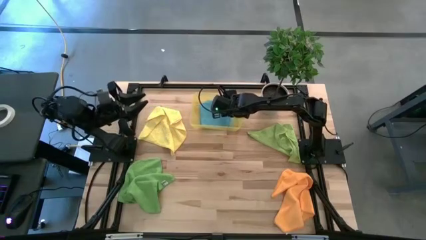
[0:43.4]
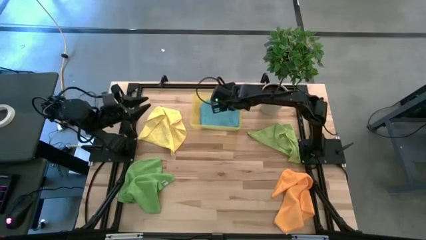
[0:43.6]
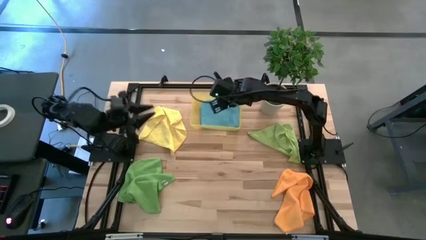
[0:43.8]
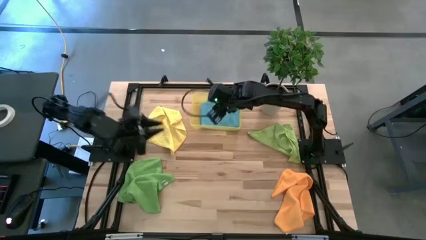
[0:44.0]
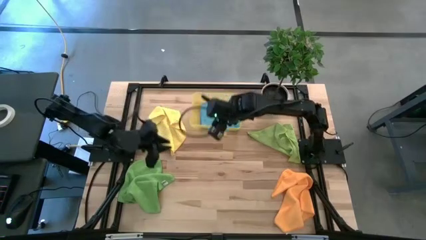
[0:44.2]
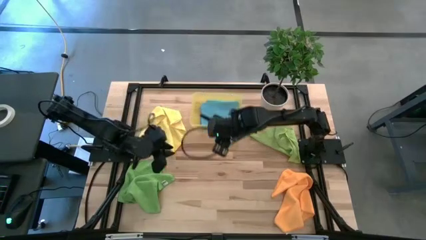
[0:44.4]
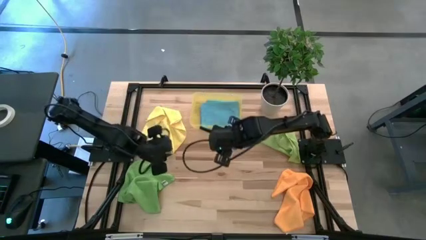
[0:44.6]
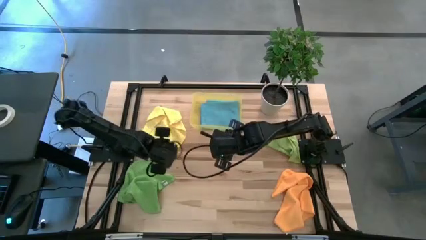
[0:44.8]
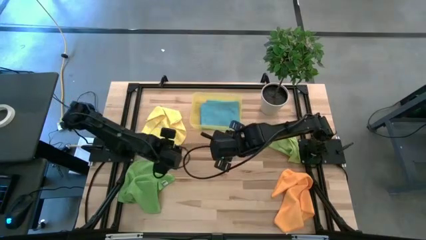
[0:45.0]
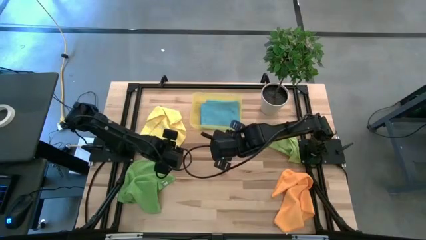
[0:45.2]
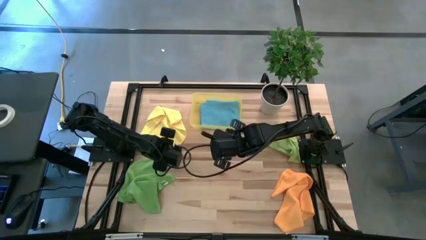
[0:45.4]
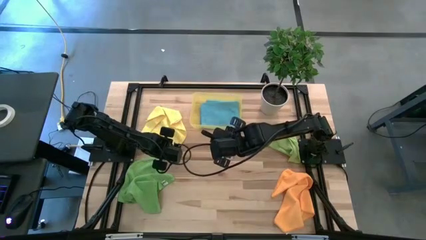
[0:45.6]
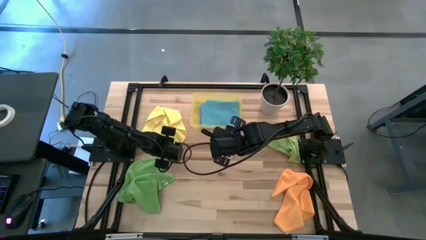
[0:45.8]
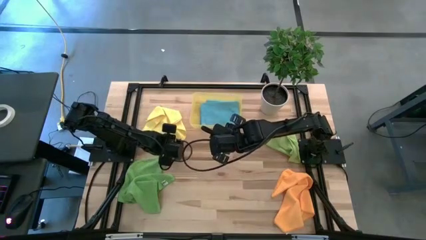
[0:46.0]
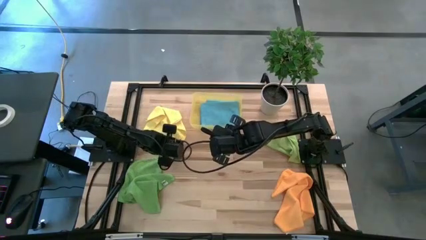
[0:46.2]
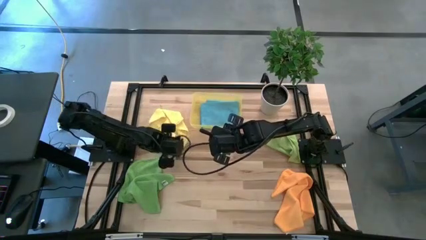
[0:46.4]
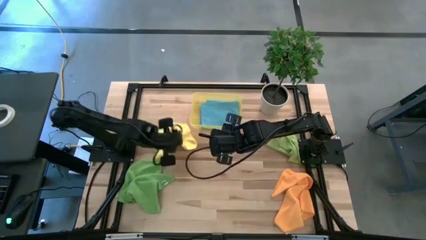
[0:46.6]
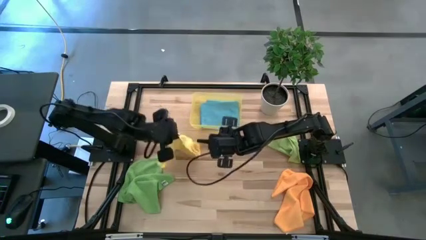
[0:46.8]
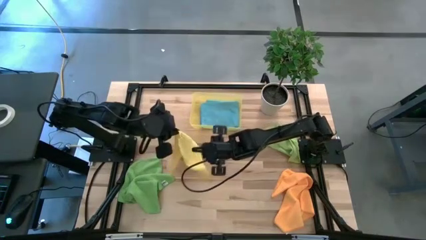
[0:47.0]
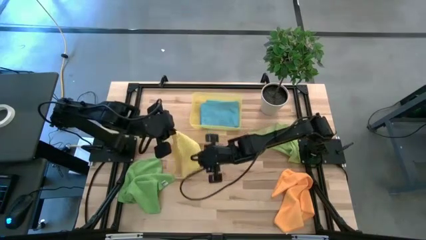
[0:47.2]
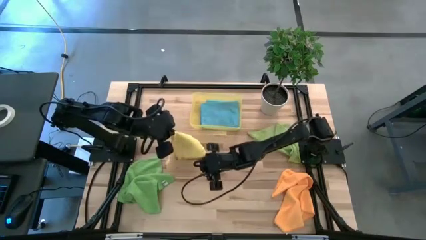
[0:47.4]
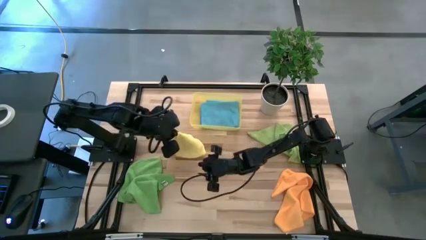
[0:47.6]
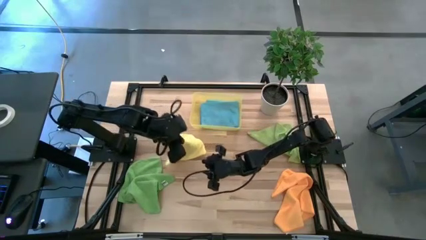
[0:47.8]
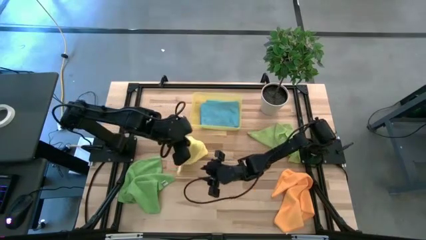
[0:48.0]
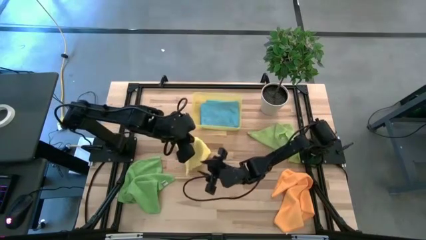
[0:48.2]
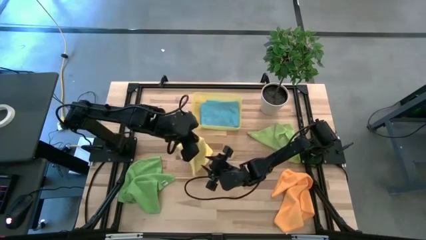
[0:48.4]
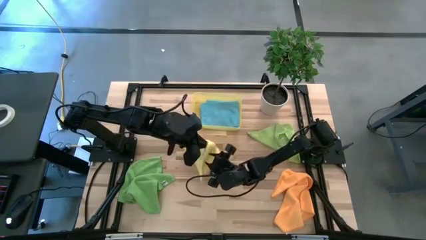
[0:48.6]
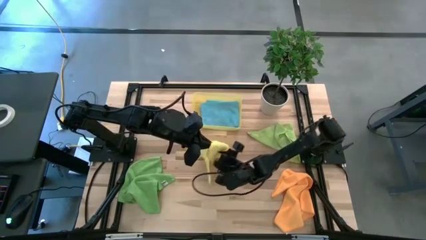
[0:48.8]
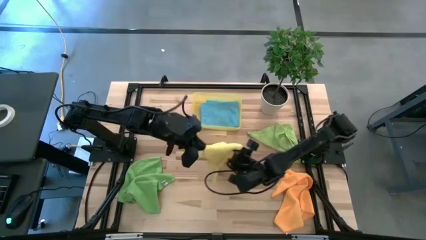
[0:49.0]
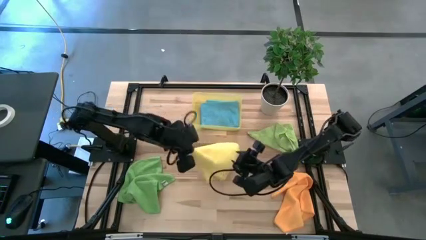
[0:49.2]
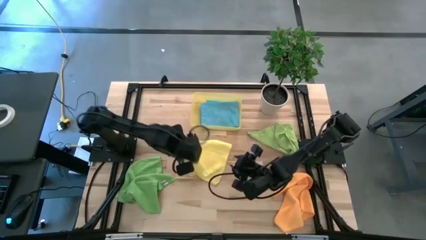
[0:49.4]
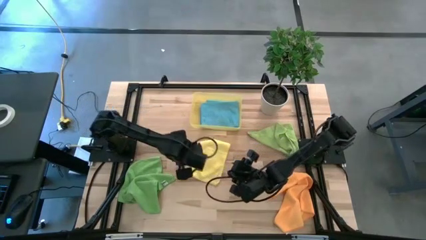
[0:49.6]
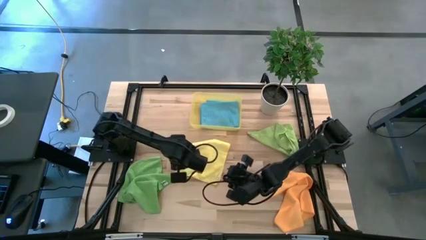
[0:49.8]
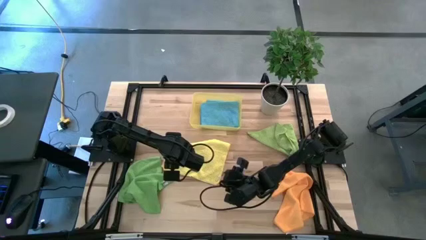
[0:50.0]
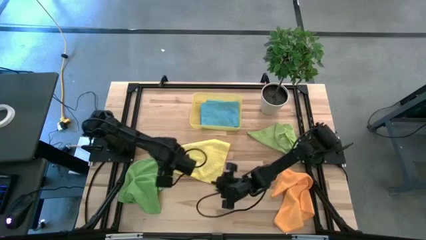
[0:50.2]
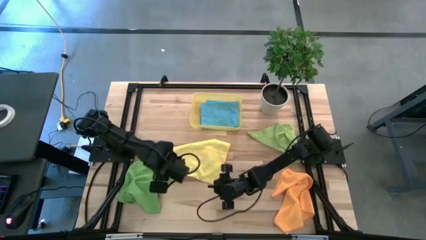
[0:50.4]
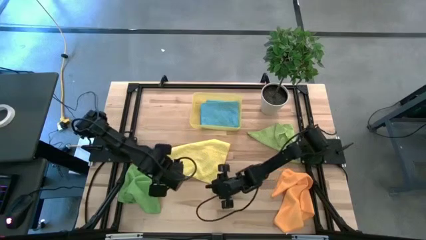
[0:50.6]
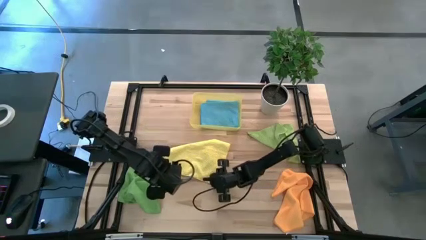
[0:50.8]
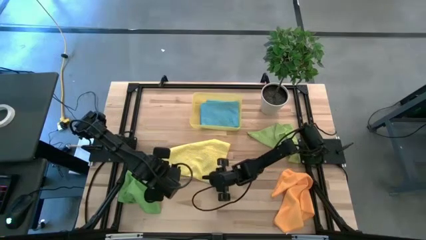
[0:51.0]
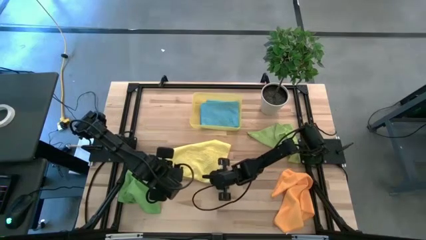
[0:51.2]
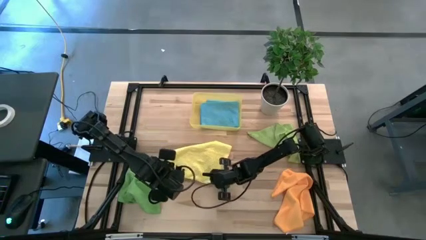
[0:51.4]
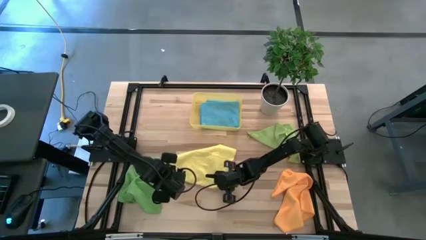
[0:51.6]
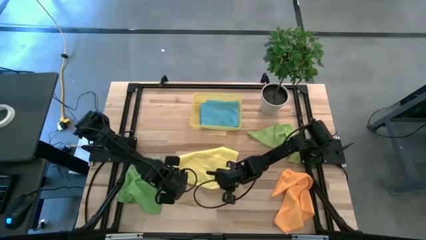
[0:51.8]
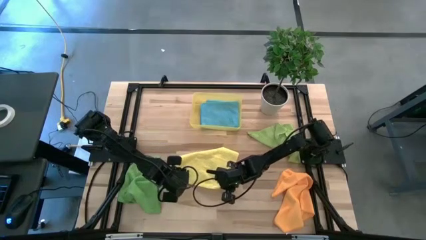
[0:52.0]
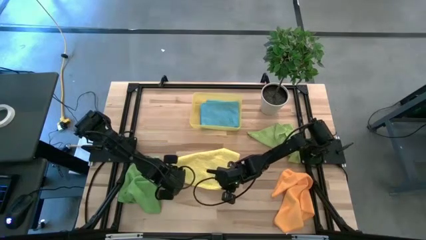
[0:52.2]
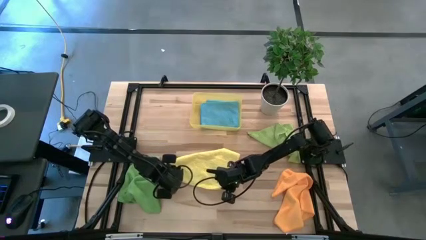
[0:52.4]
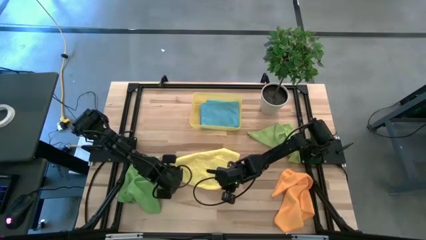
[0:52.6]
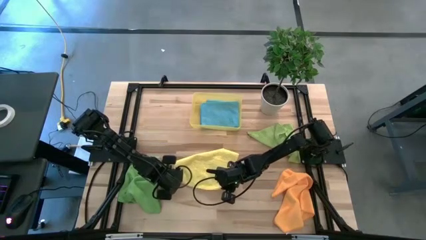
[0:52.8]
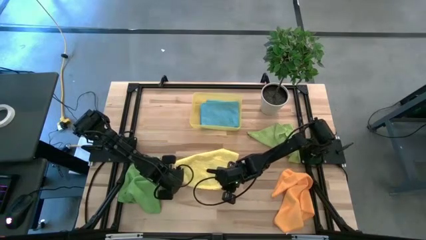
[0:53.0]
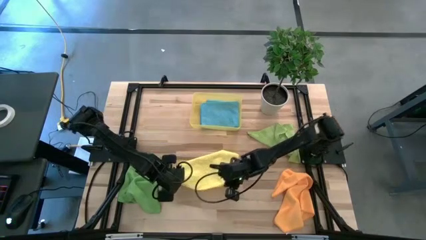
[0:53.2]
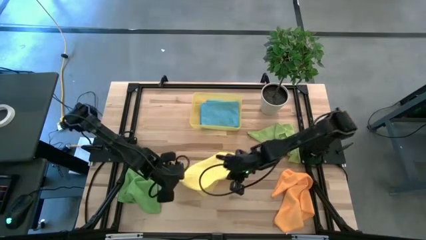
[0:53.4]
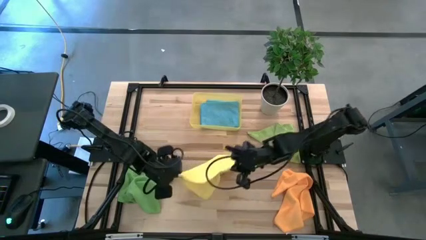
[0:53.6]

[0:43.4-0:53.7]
Task: Fold microfiber towels
Fold the yellow microfiber cloth

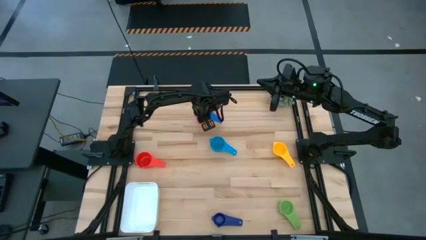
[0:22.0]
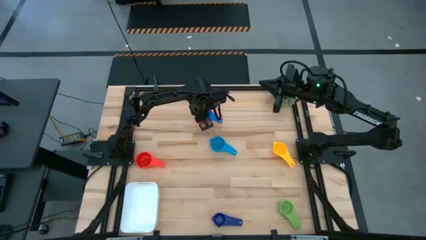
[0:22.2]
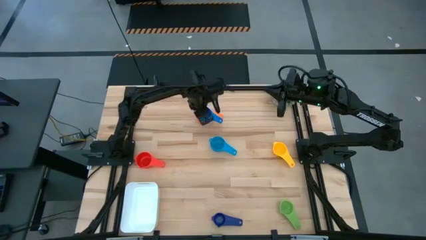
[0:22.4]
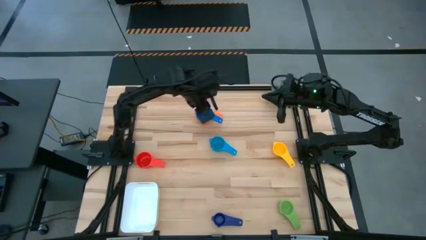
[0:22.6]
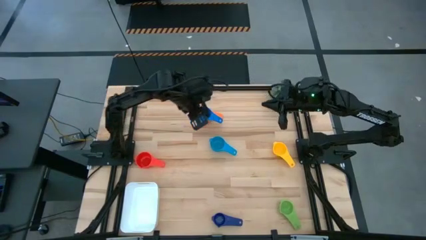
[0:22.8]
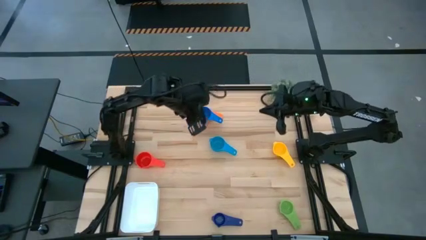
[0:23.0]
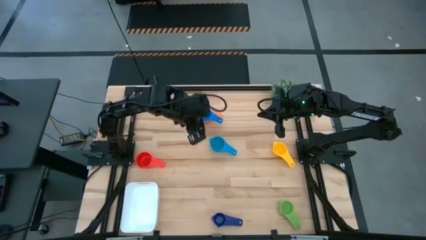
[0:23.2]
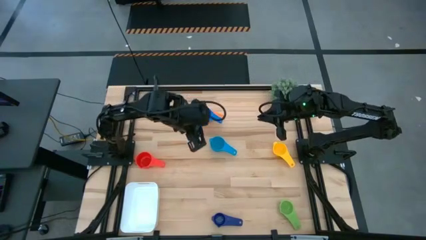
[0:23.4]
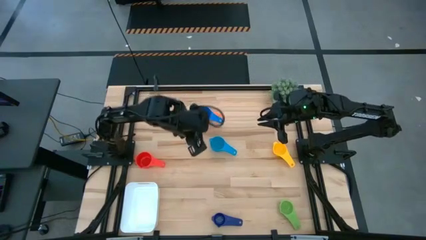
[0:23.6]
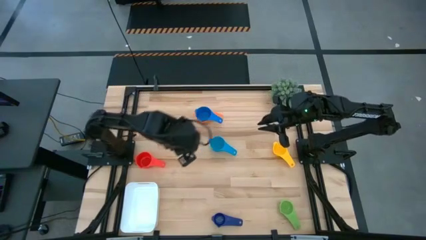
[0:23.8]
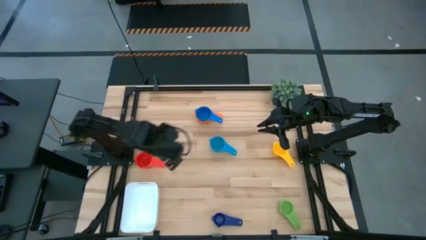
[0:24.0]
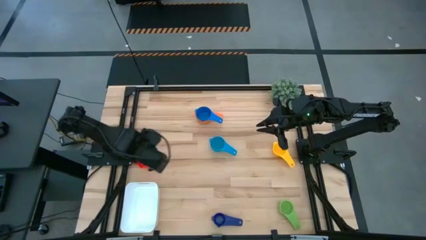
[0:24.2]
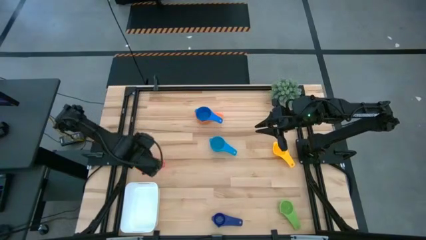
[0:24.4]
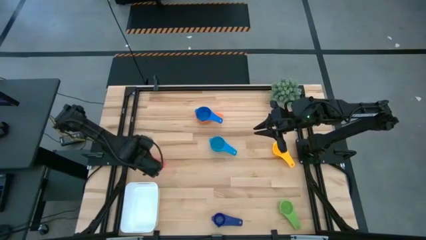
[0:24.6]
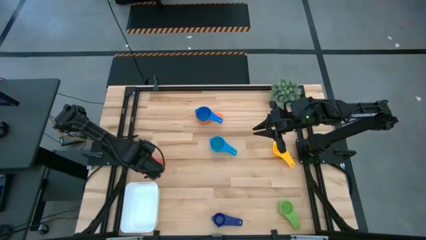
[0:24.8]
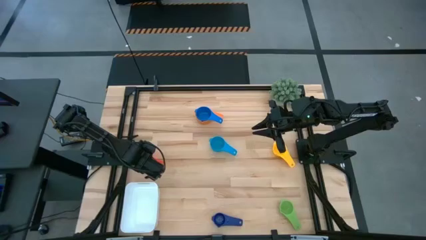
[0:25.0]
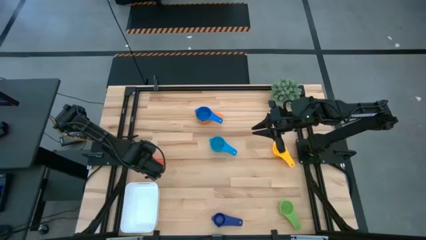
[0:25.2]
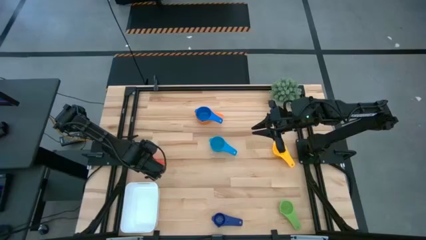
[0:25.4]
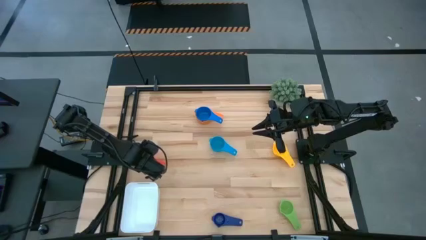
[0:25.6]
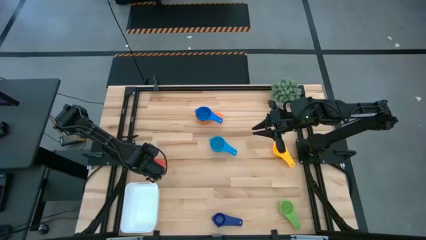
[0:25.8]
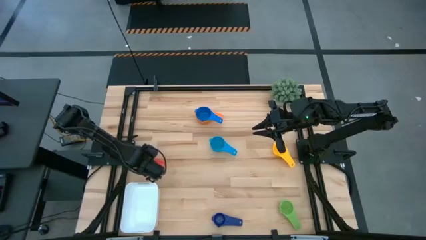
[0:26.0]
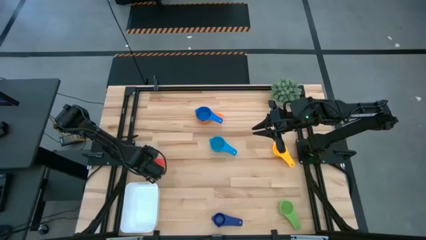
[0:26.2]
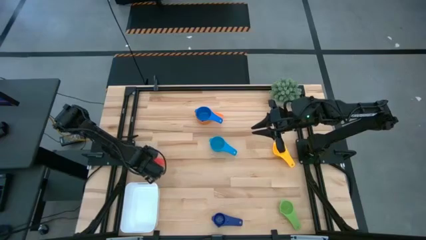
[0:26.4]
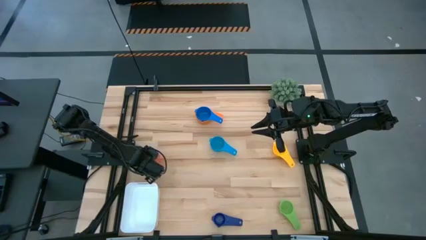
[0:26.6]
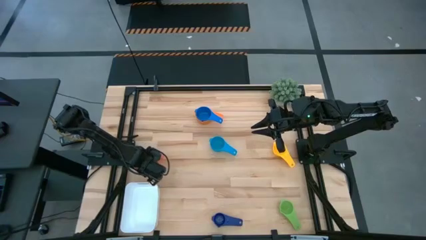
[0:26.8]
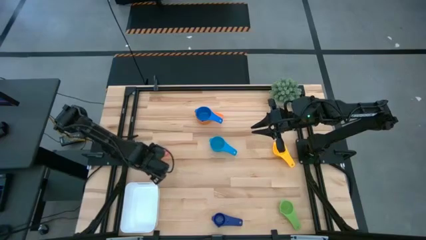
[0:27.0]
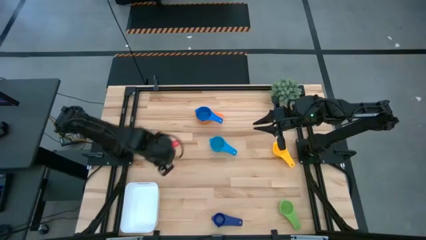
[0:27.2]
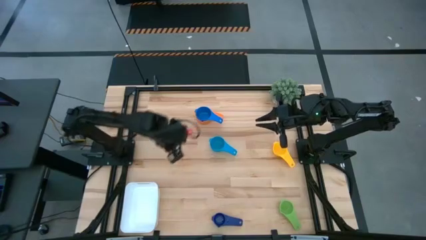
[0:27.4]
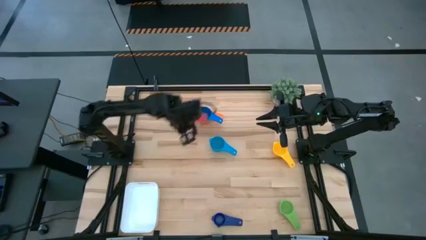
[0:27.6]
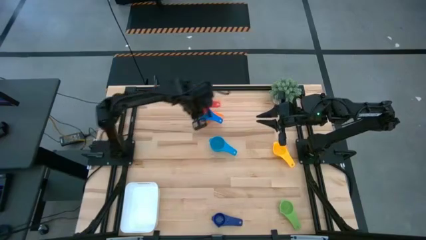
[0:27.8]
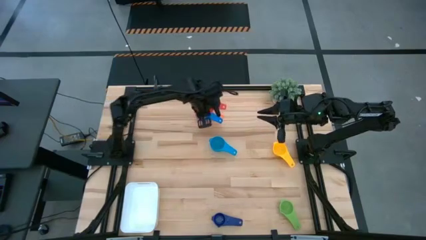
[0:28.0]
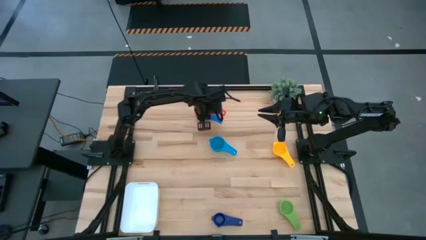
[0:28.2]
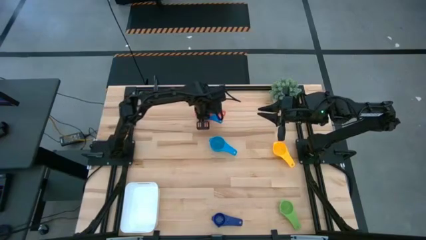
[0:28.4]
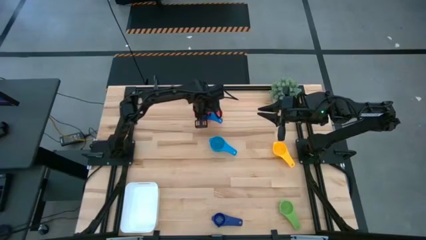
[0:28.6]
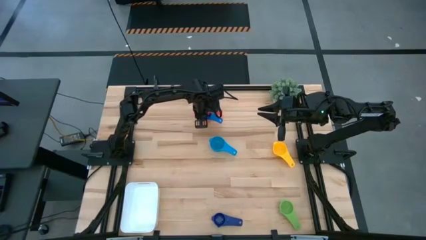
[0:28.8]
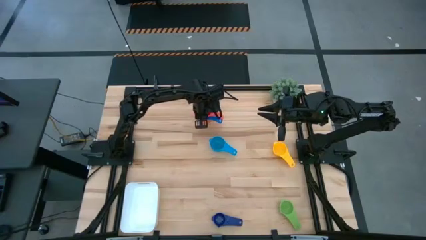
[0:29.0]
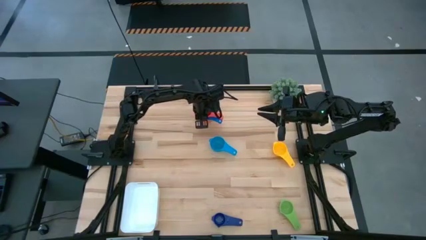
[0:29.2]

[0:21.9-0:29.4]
Task: Nest measuring cups in basket
Stack the red measuring cup on top of the blue measuring cup
